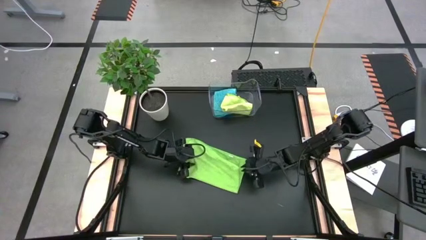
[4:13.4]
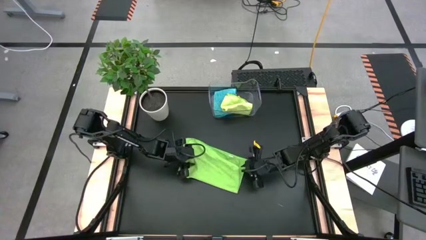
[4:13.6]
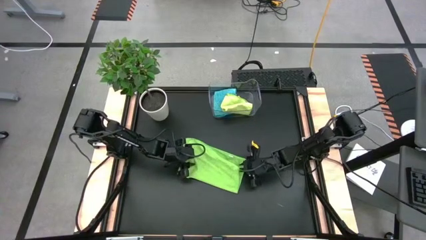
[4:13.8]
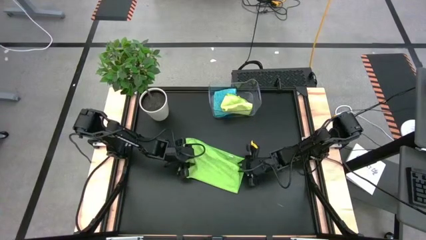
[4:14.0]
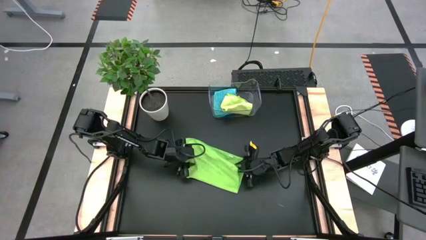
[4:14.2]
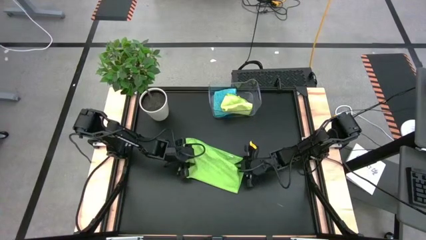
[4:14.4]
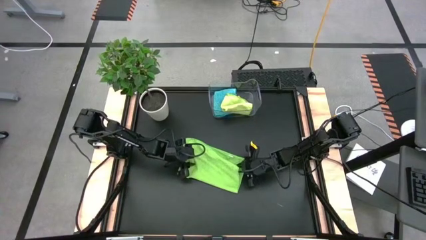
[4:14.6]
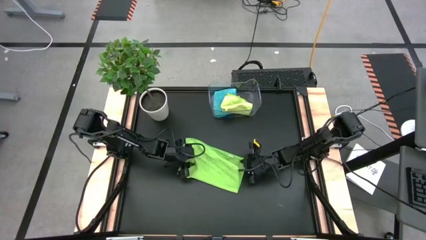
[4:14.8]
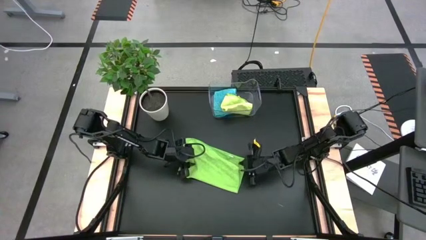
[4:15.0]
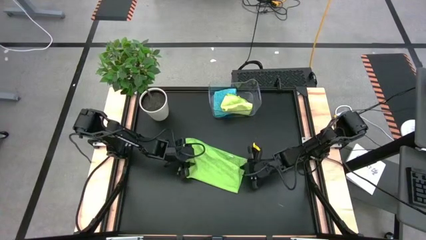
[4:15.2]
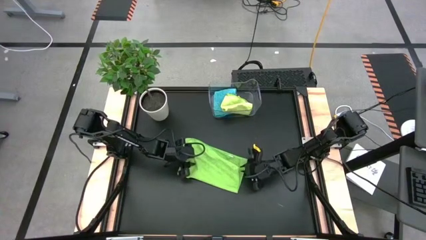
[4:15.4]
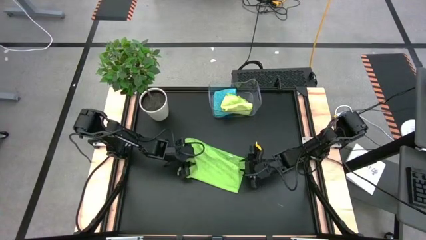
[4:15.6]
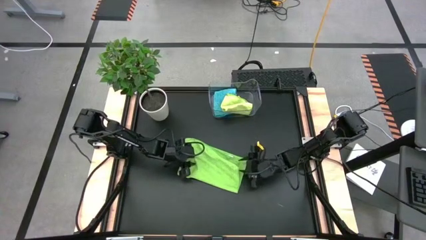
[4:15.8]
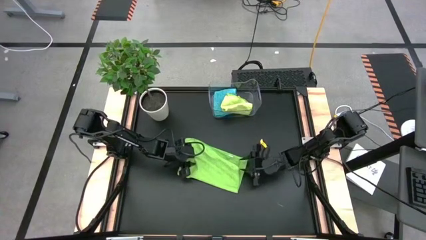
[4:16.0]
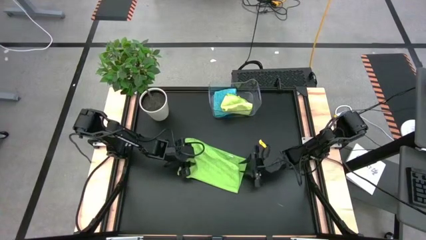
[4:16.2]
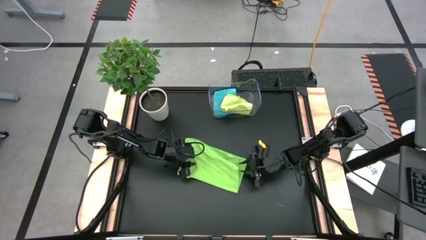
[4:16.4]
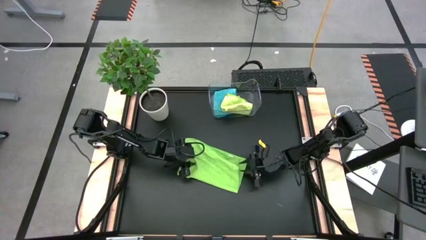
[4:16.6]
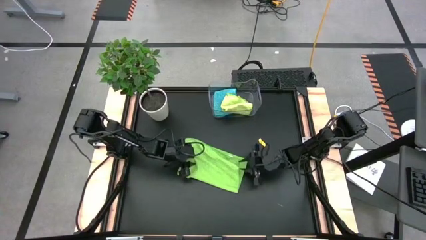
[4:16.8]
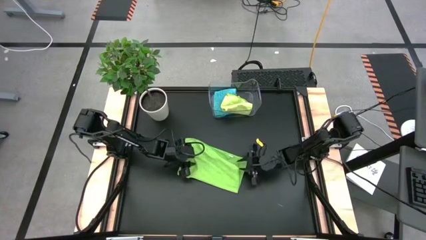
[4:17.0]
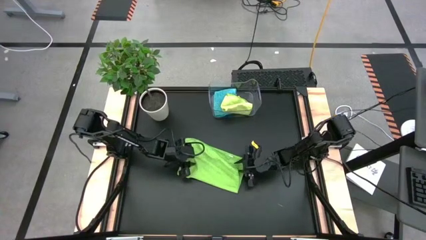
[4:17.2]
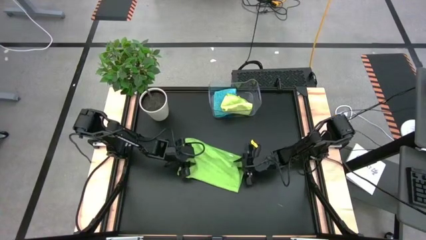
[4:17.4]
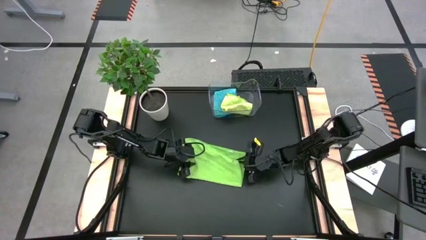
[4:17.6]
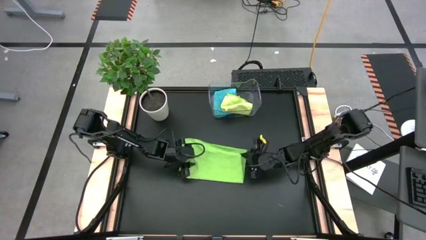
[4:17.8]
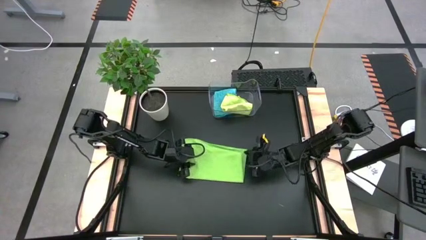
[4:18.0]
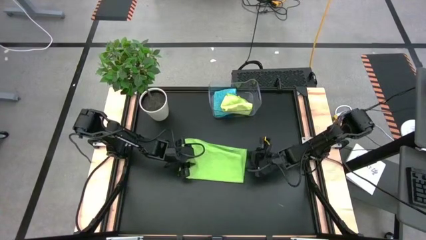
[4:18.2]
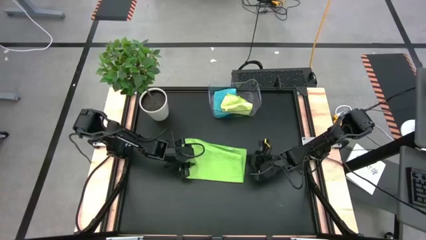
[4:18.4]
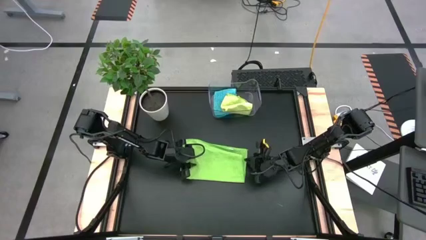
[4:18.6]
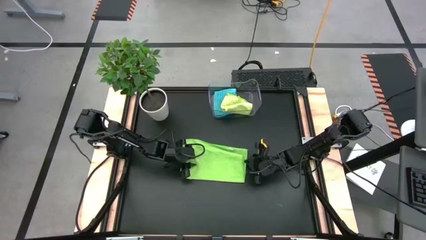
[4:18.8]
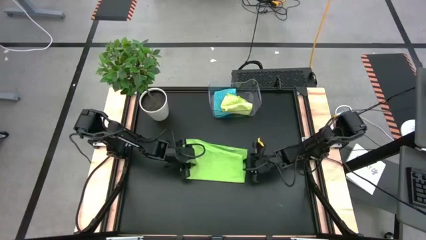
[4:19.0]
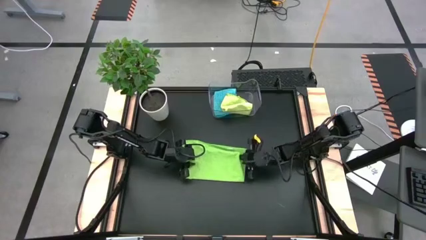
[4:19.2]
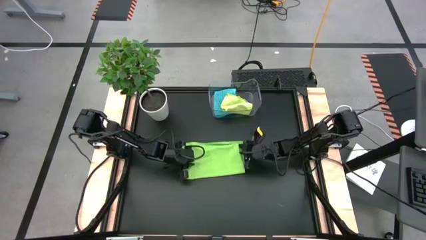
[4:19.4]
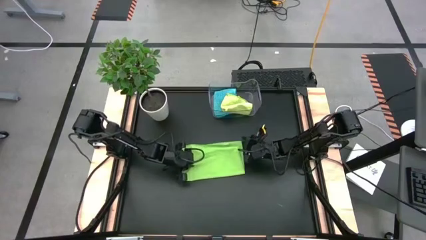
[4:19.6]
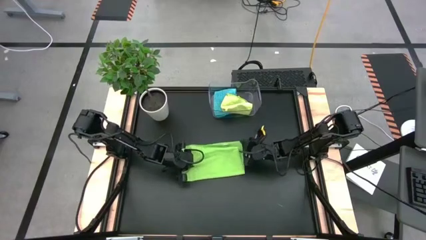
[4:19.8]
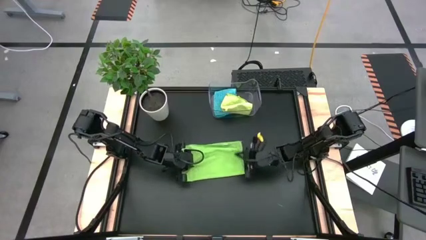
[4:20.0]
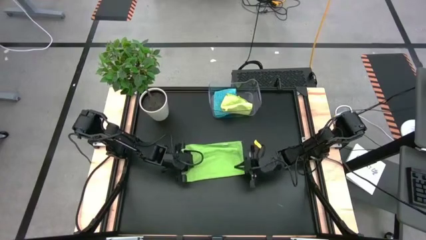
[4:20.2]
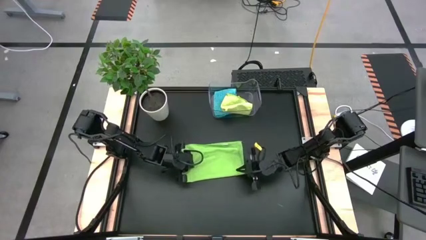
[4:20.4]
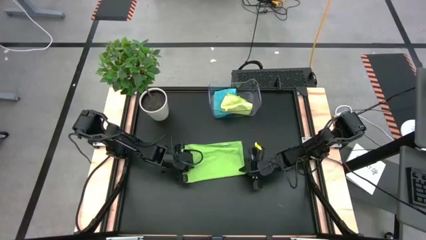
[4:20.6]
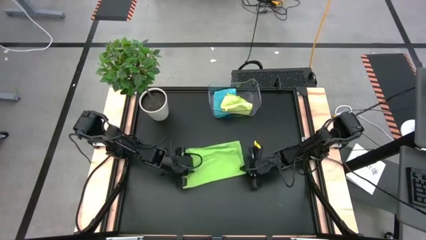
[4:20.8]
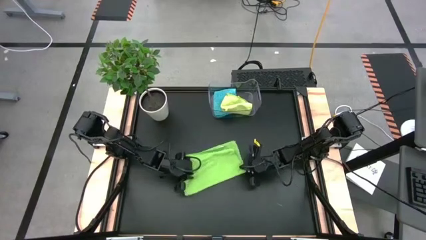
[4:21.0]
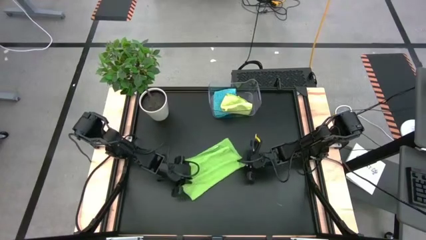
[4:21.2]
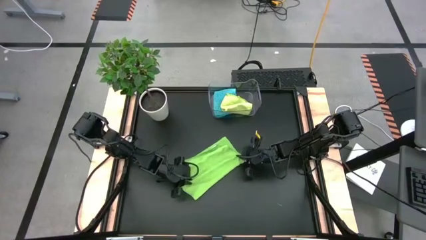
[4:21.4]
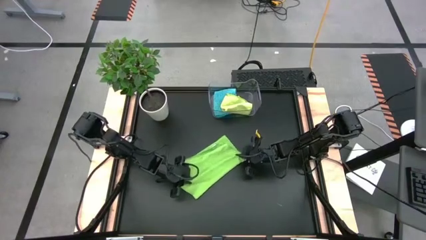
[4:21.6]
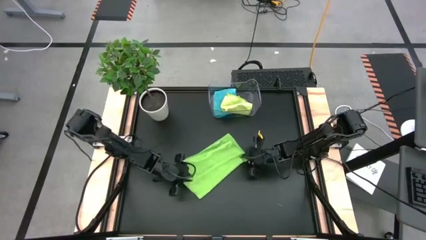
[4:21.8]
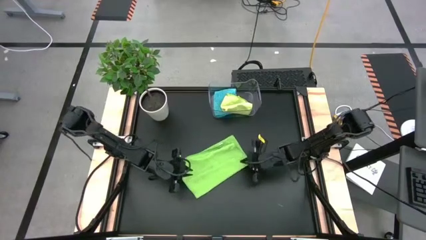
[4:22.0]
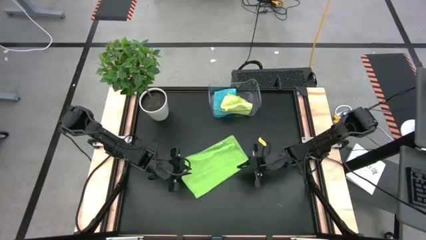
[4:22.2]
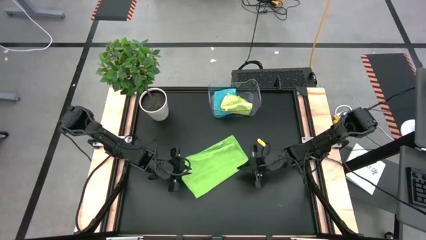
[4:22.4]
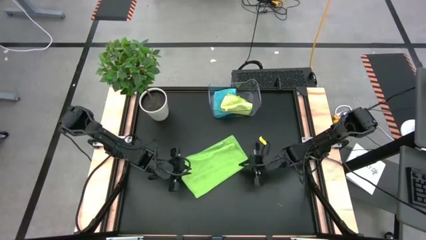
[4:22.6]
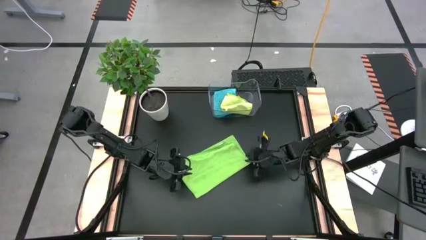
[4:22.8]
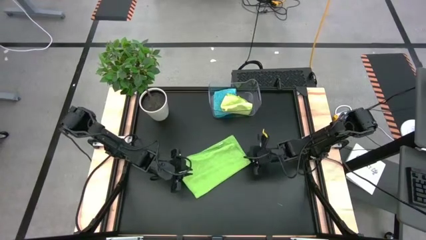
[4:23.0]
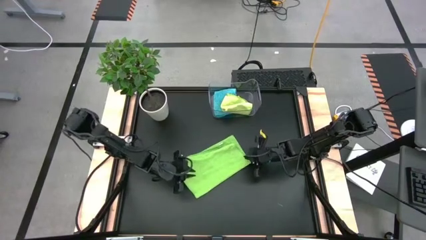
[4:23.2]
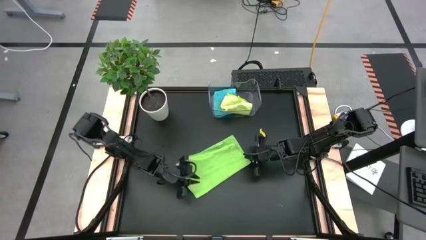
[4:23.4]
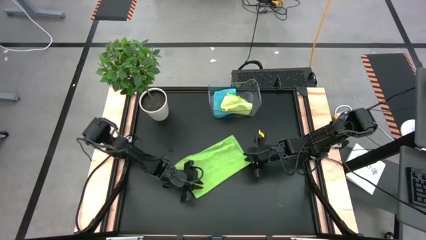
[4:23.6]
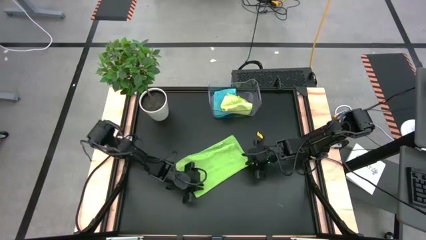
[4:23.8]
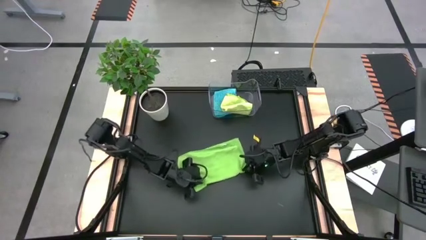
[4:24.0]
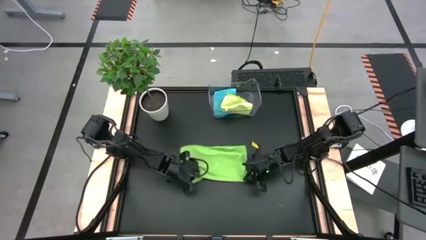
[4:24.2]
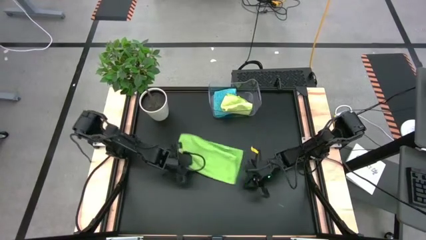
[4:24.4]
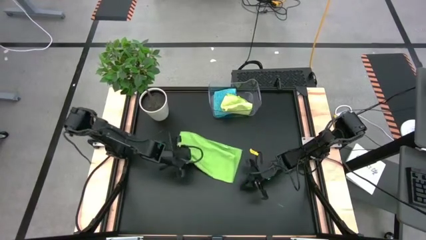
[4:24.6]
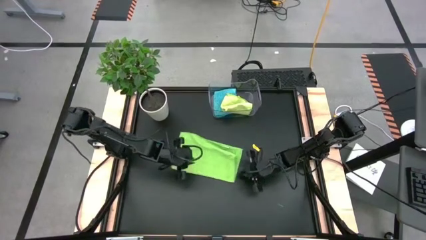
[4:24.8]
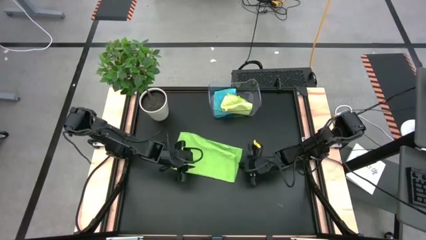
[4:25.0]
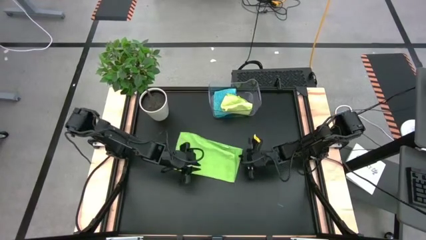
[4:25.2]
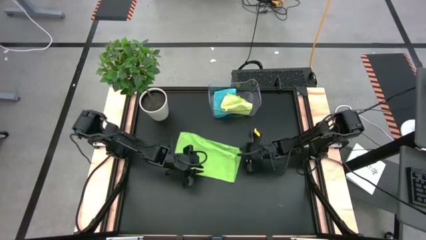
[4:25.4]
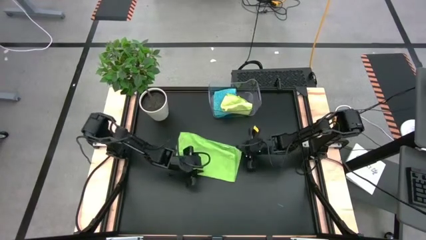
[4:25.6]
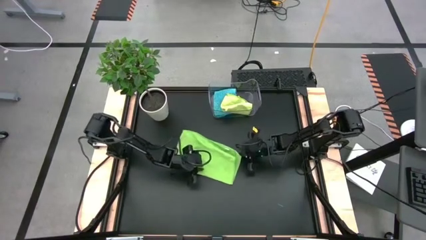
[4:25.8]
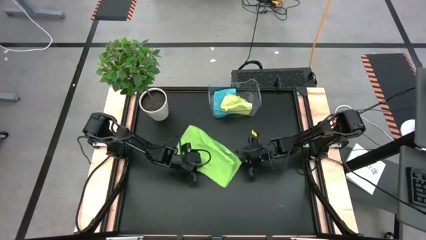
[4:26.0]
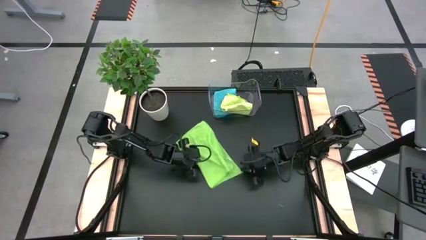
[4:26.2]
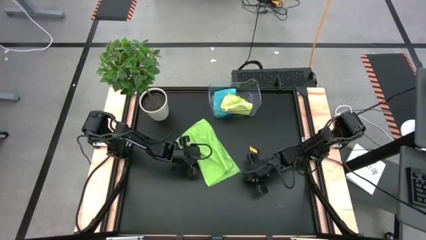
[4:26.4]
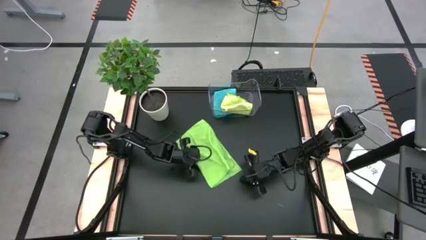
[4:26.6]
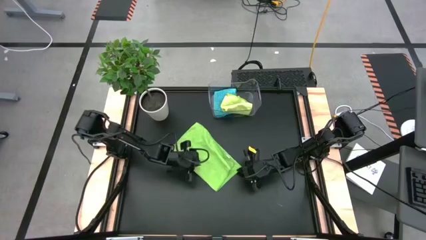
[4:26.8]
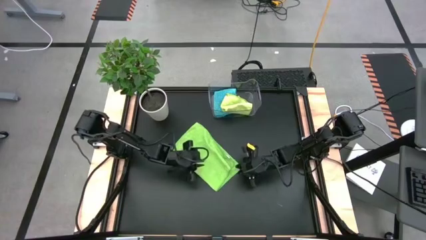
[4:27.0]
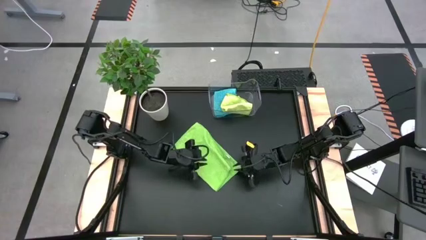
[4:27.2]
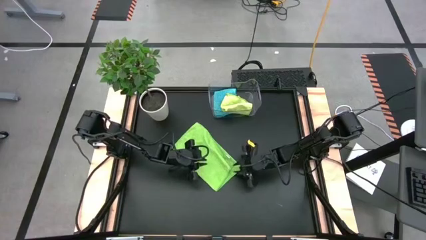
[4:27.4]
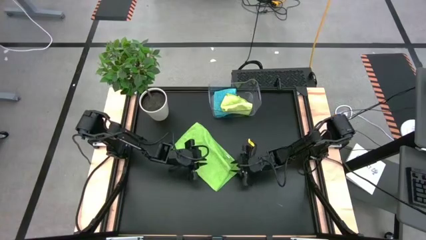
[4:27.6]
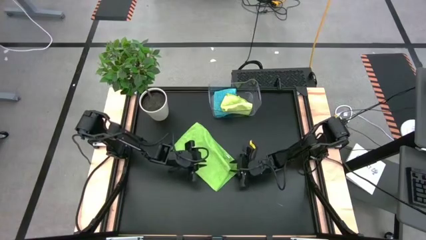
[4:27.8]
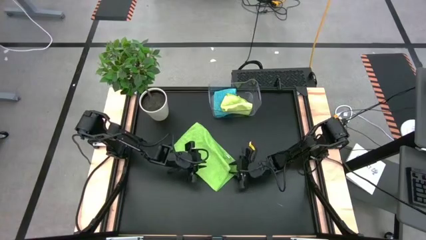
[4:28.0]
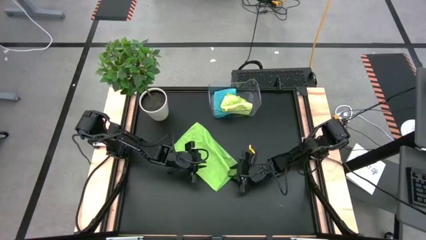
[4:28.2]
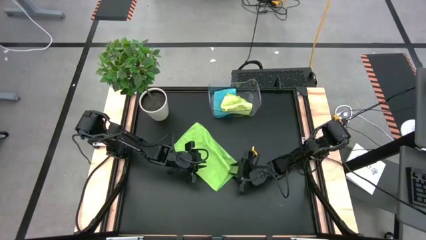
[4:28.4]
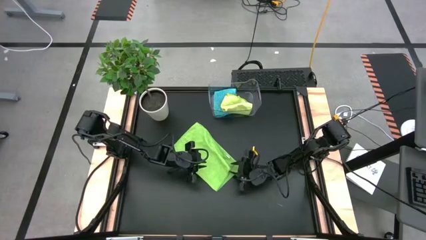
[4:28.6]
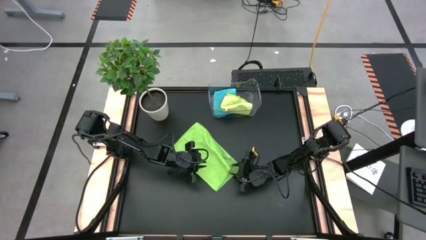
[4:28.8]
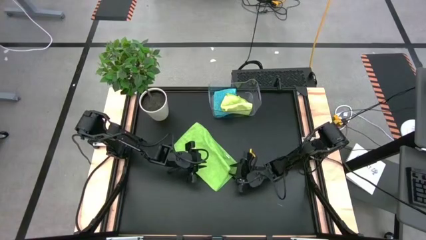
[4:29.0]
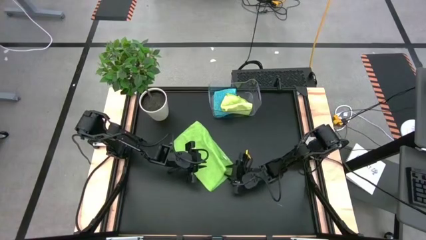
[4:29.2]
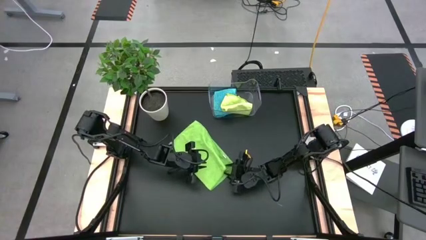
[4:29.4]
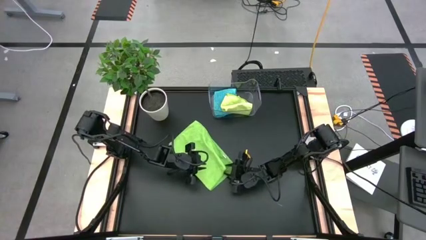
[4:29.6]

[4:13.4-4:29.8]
Task: Fold microfiber towels
Fold the green microfiber cloth
